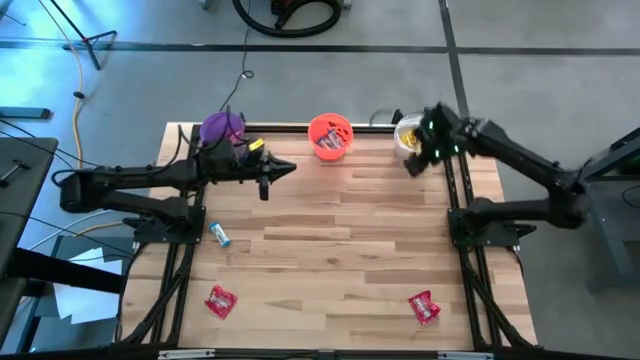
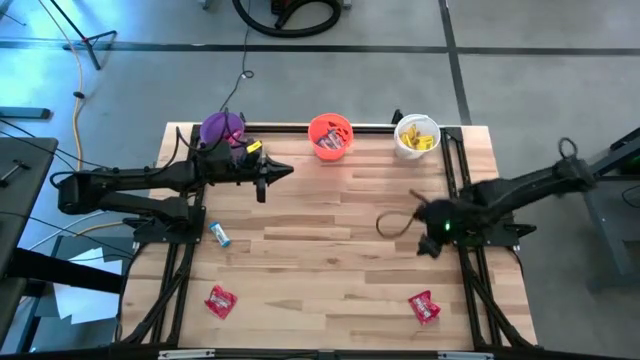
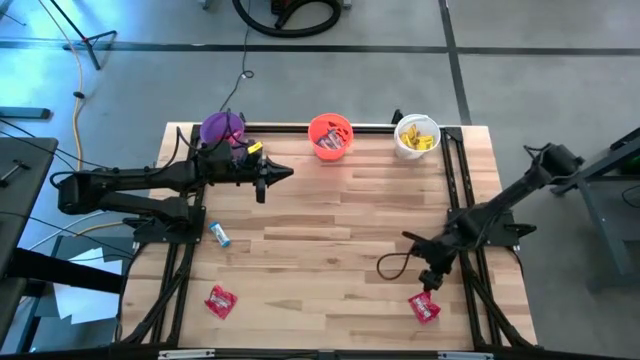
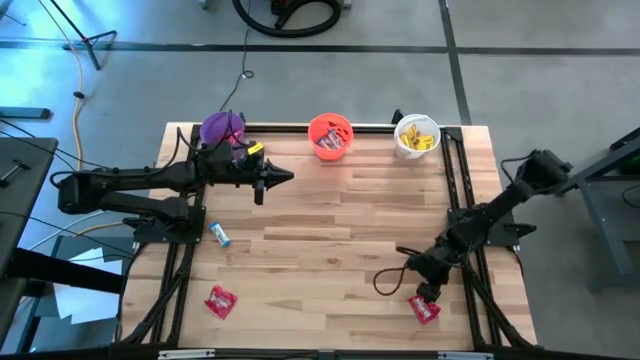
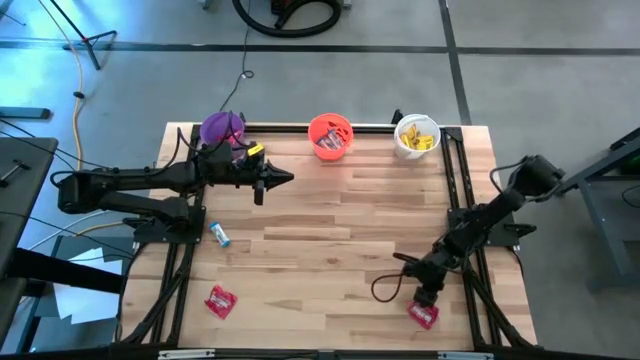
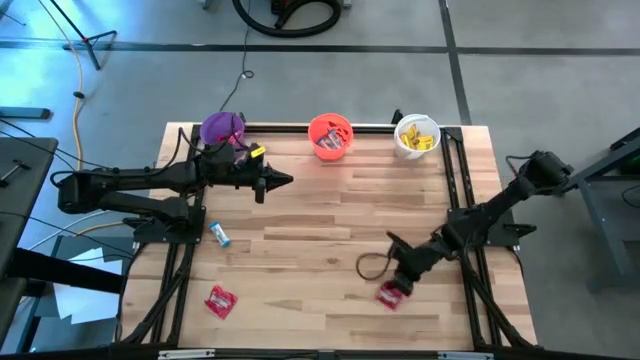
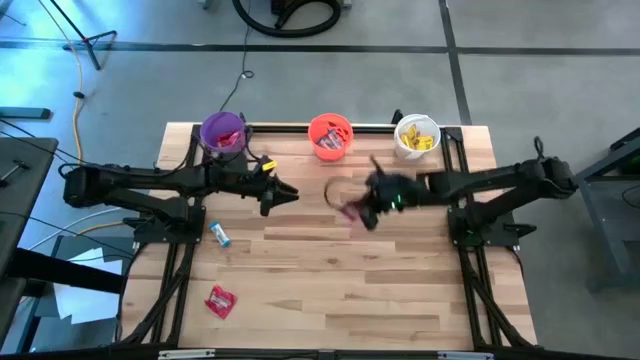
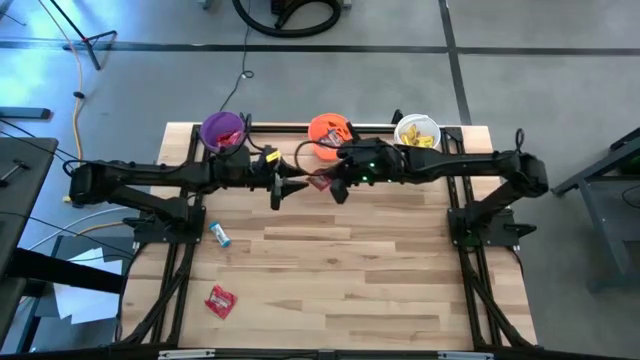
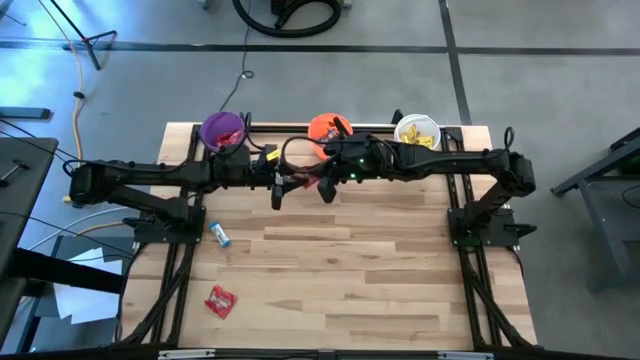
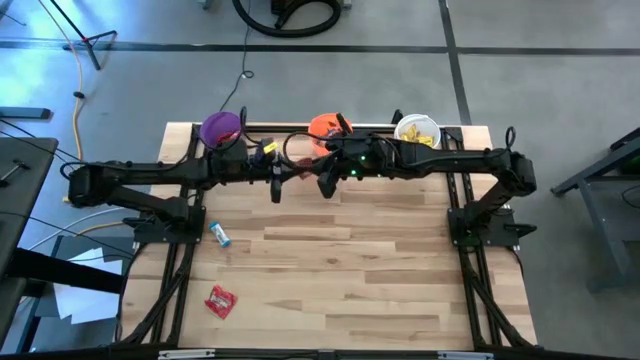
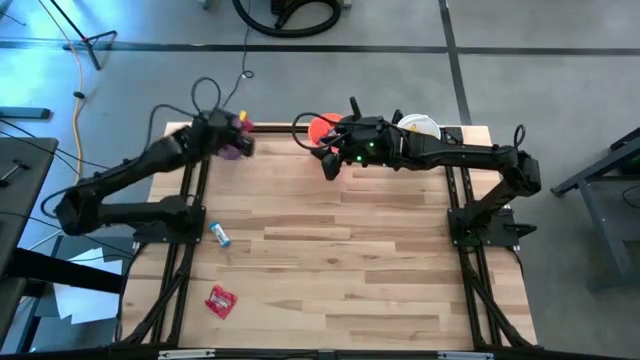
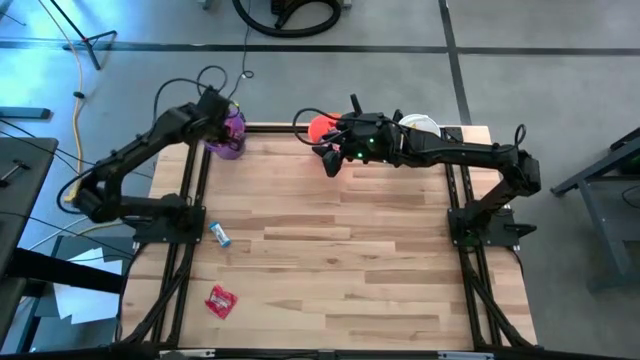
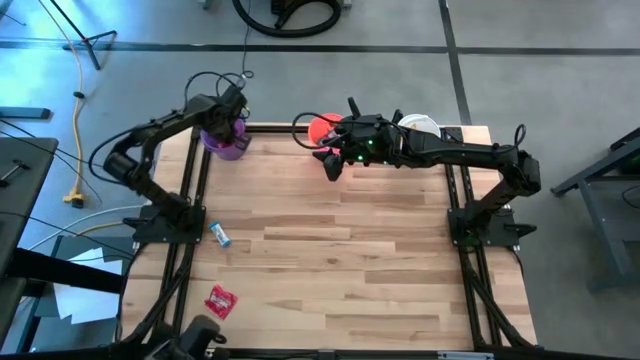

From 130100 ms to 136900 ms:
Task: Organize candy in baskets
Put the red candy into the violet bucket

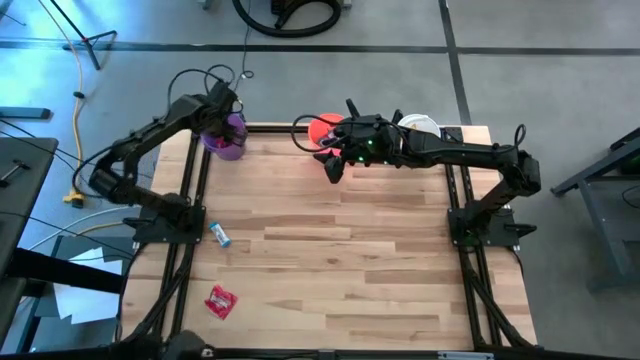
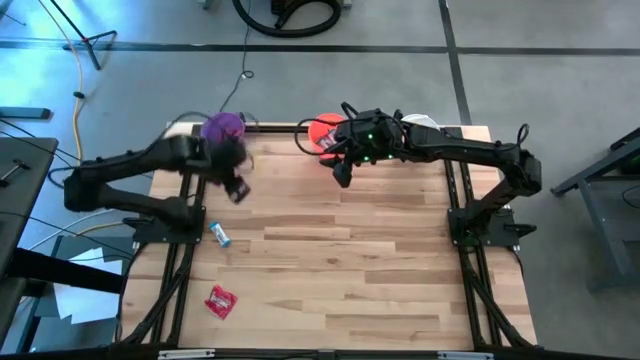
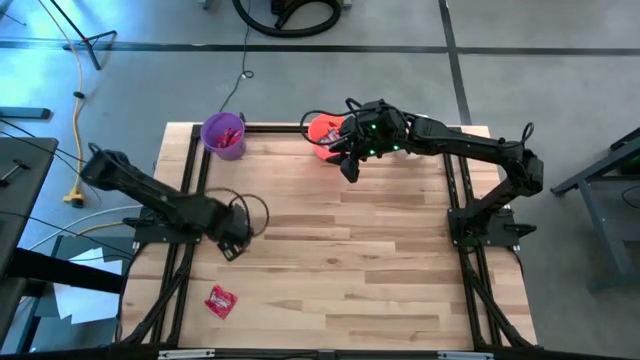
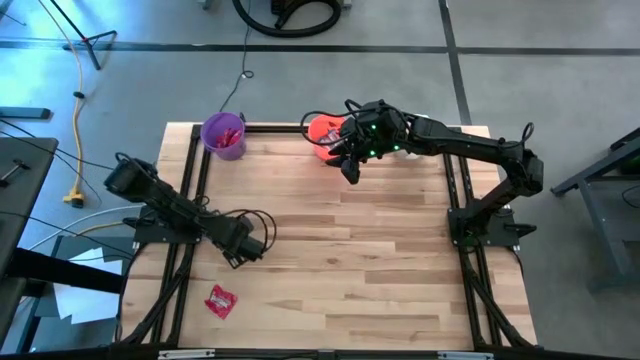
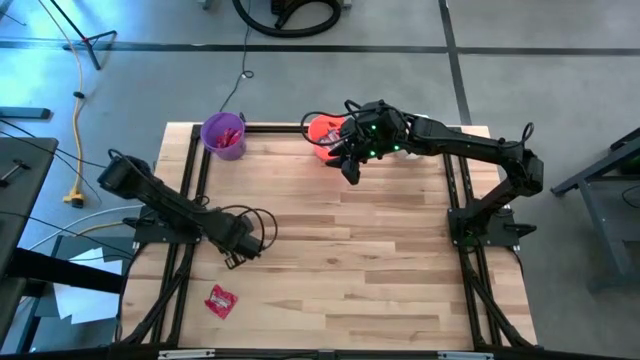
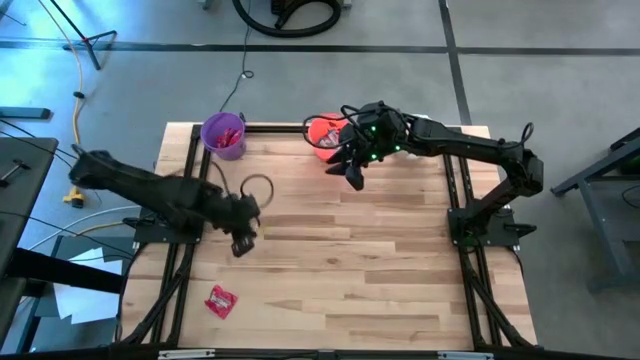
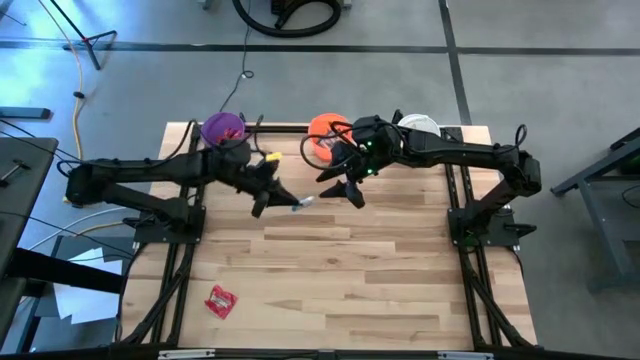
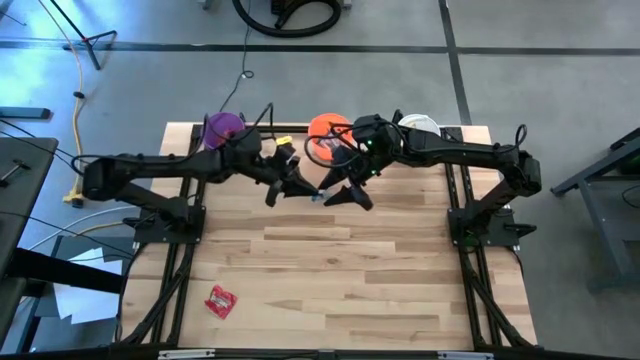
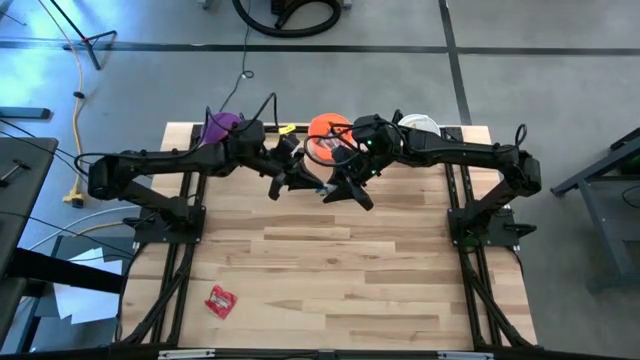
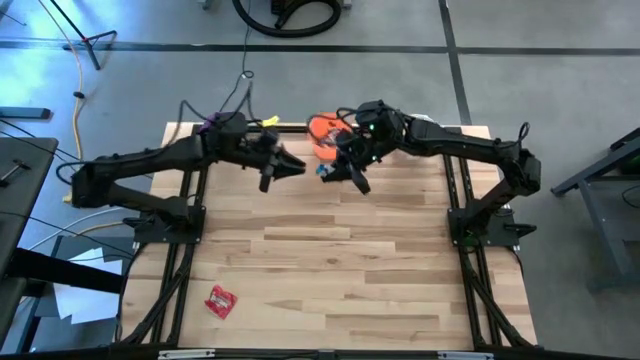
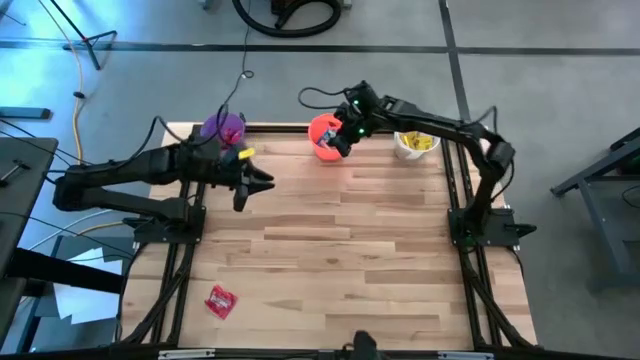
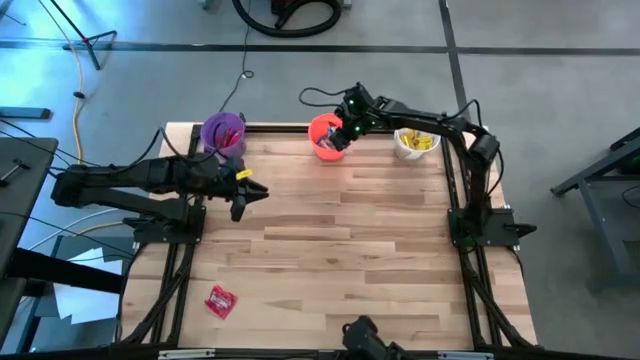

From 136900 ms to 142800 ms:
Put the white chocolate into the orange bucket

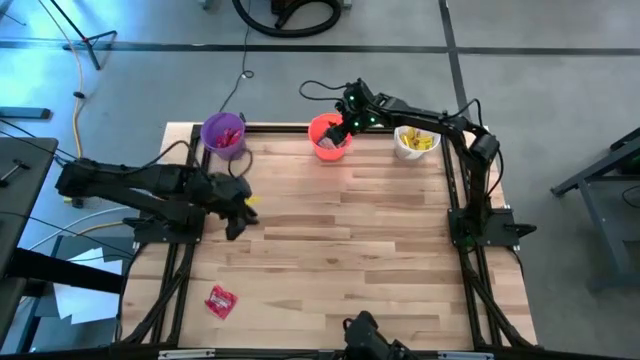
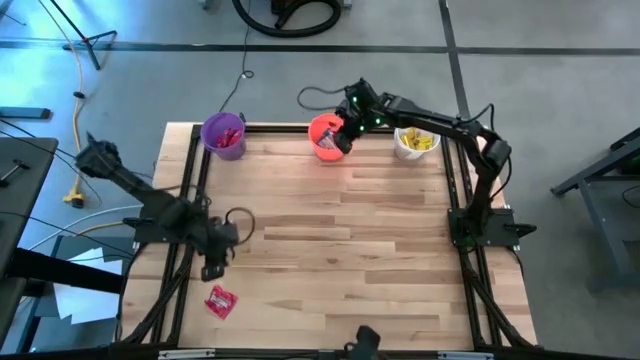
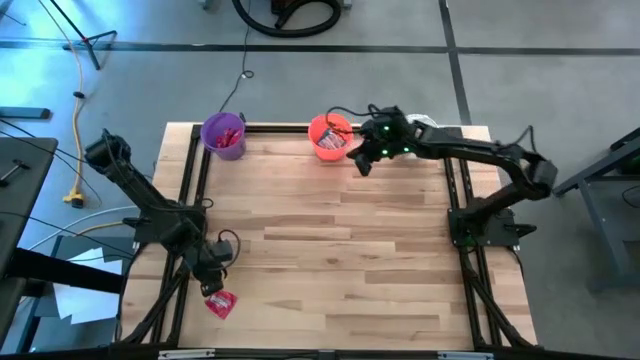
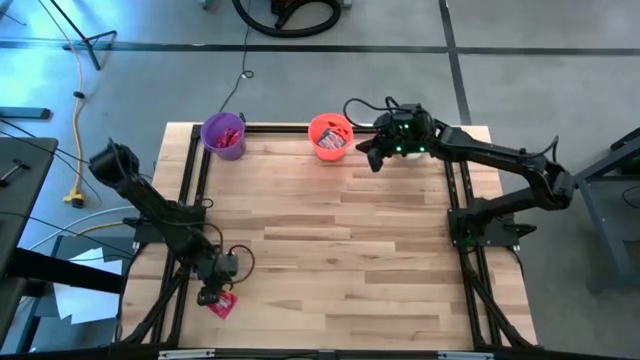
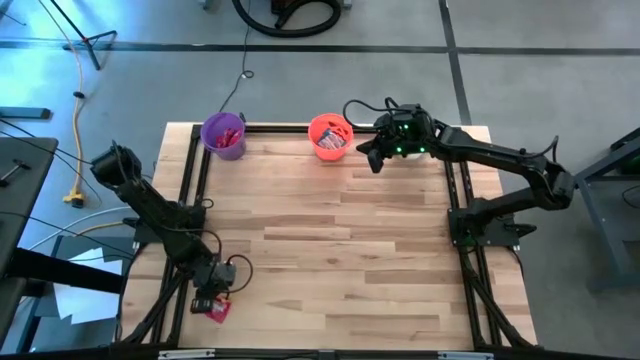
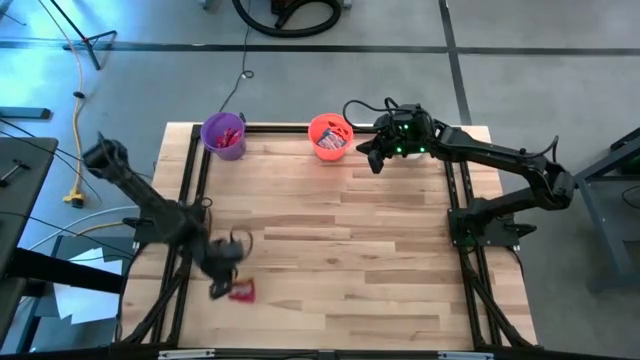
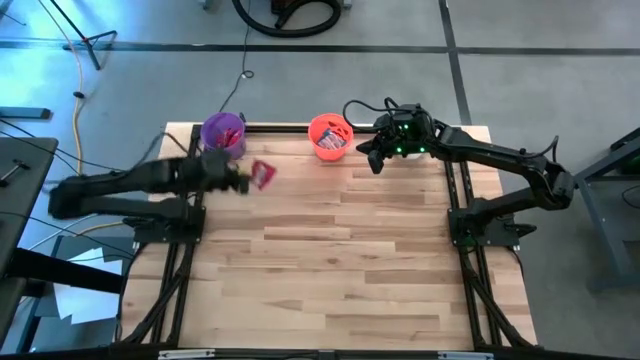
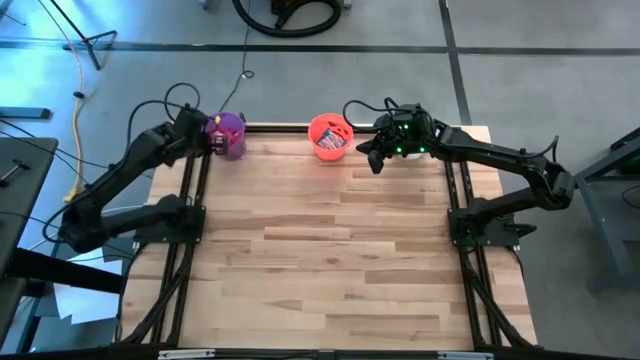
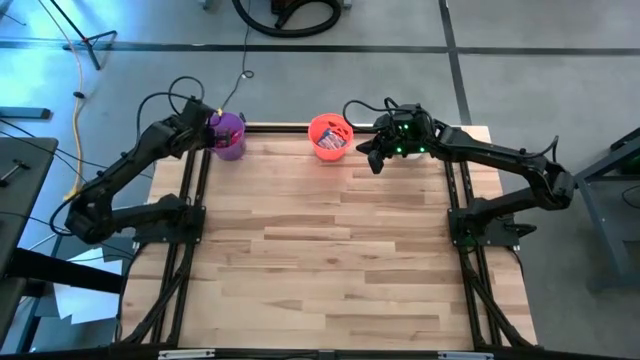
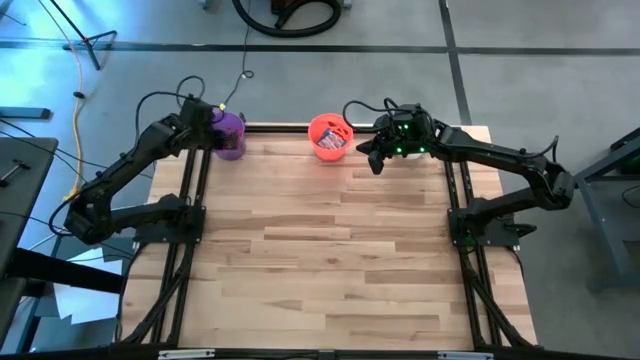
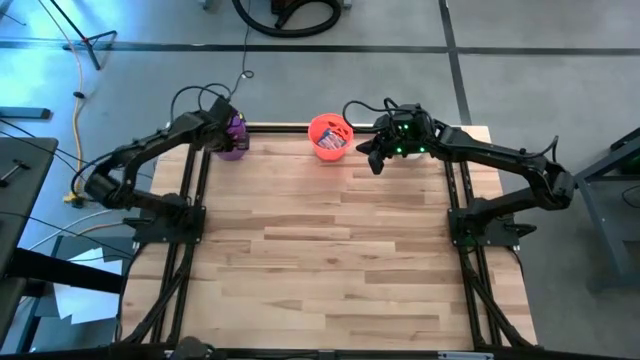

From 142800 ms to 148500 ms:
Put the red candy into the violet bucket

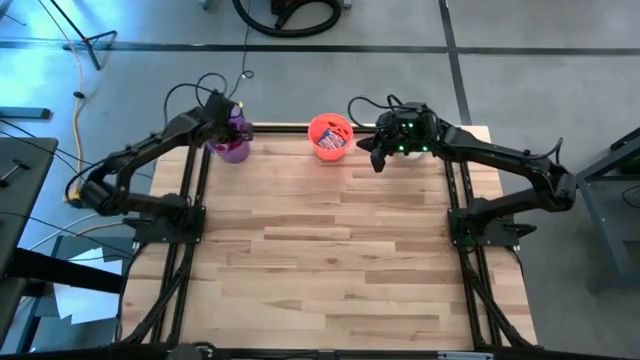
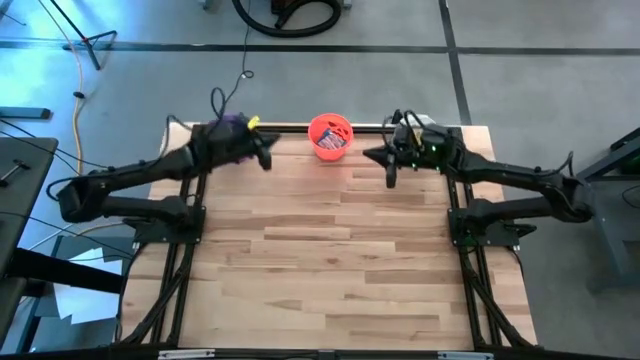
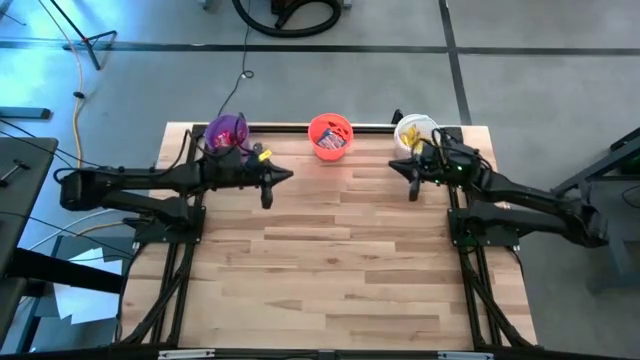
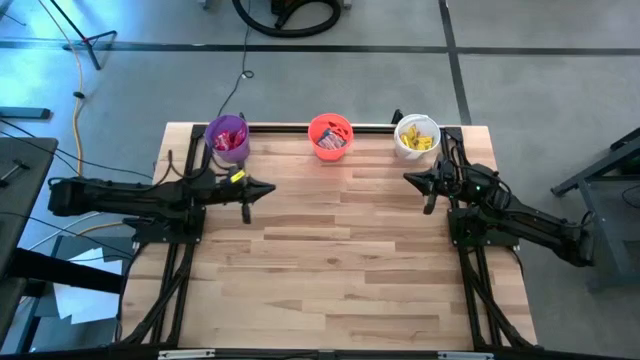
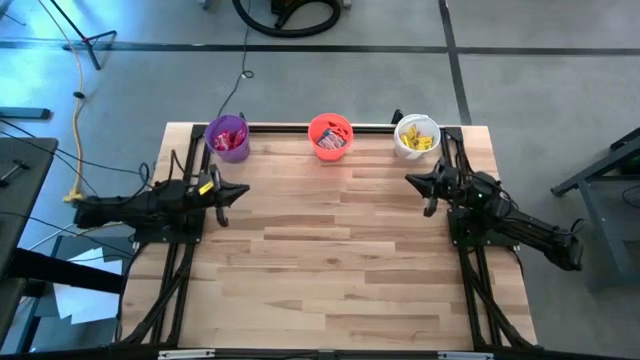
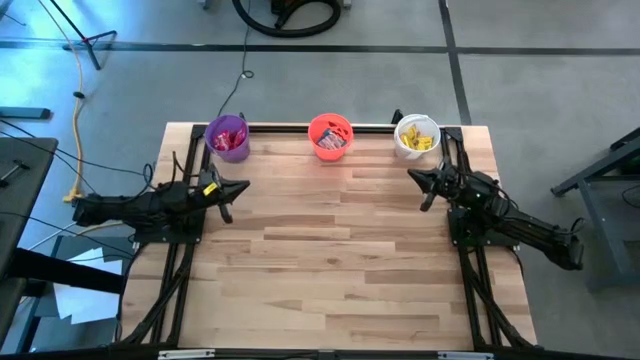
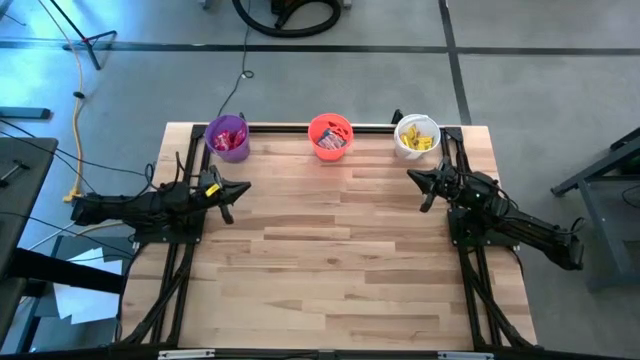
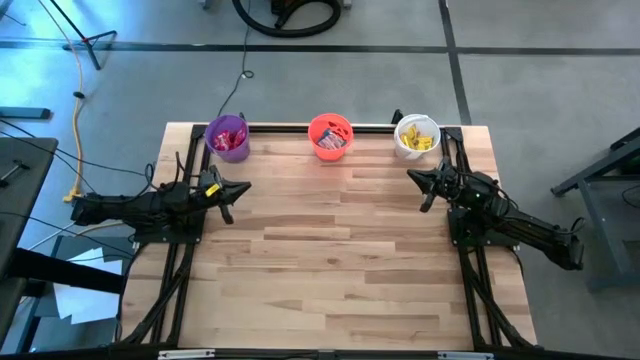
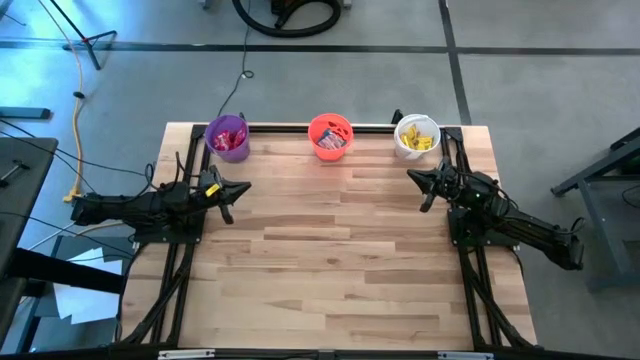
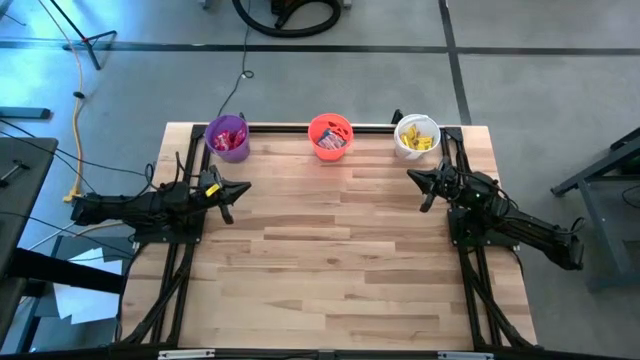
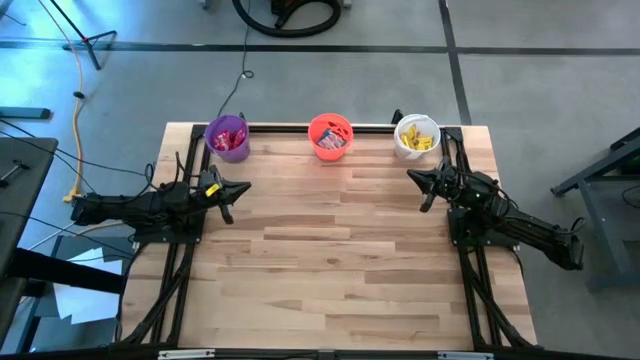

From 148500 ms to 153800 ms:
Return to Home Position
